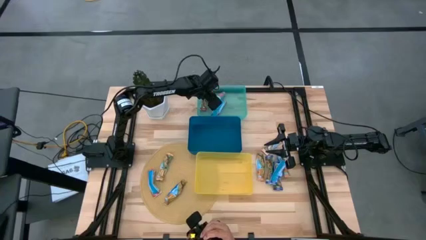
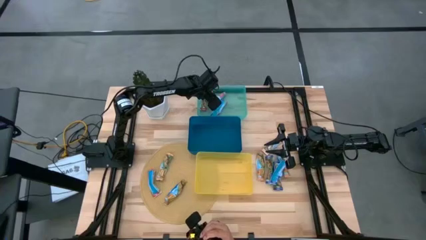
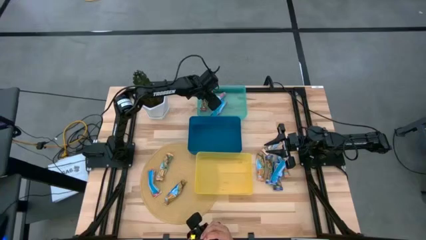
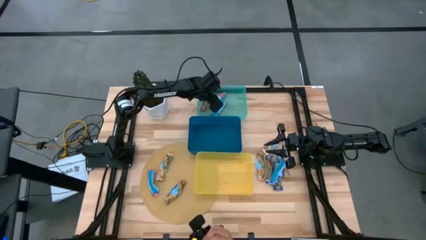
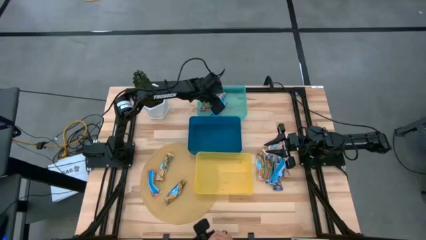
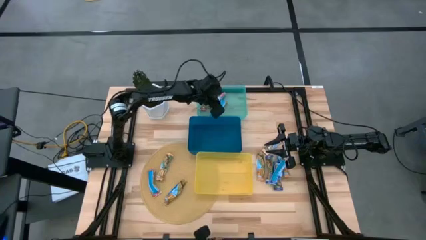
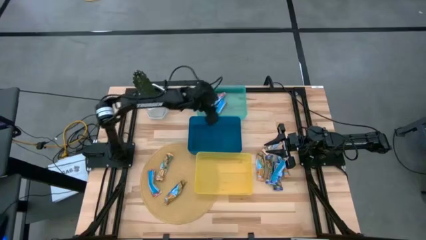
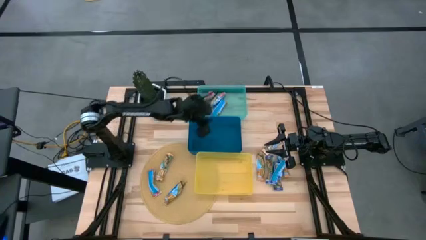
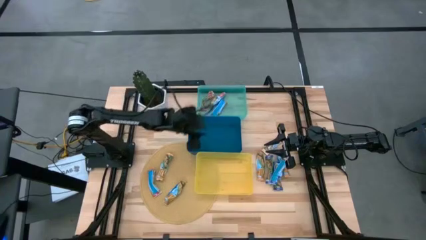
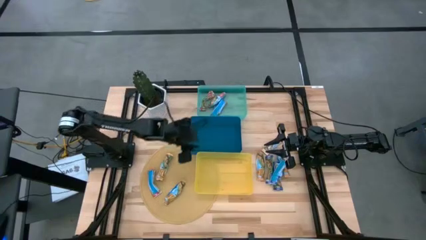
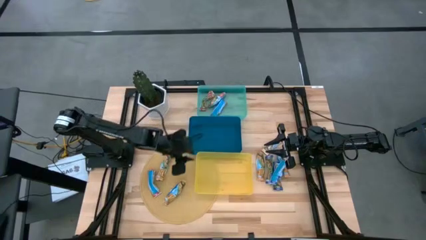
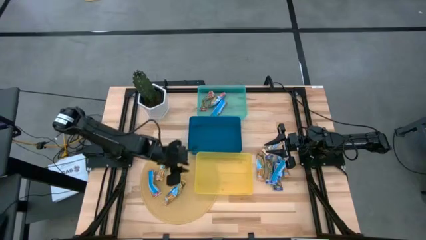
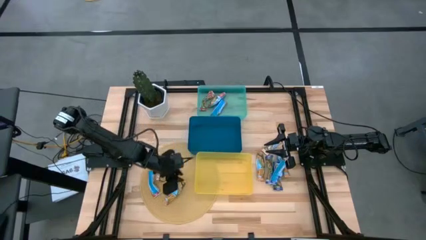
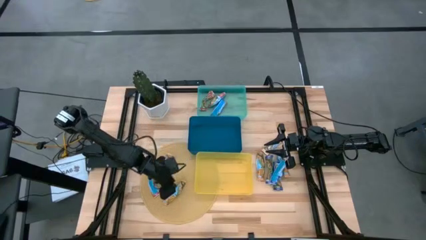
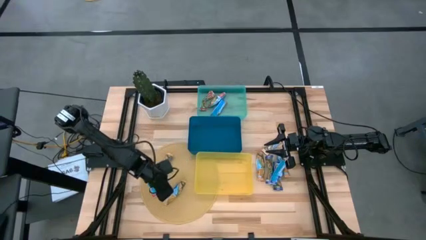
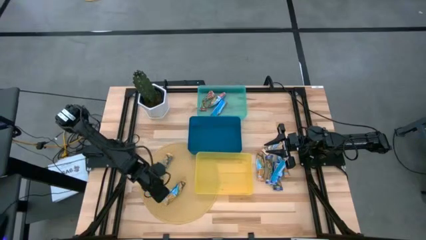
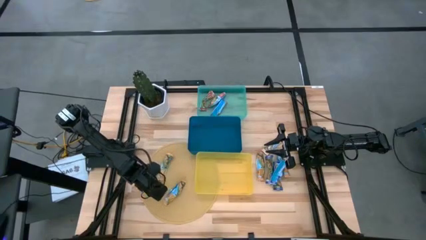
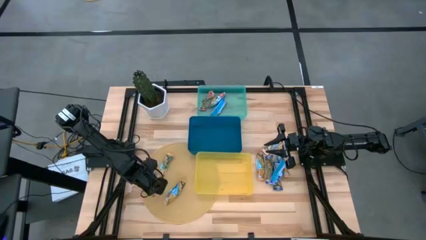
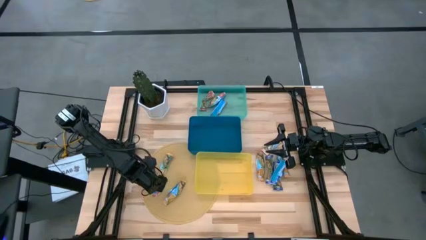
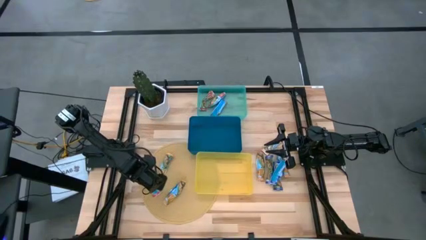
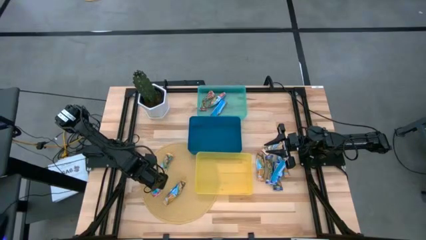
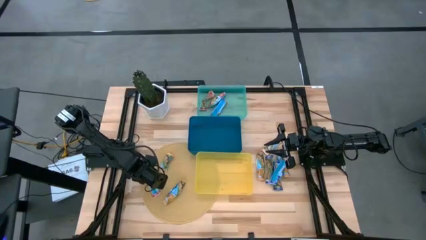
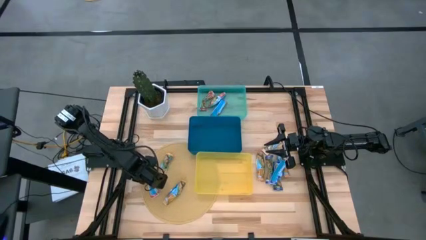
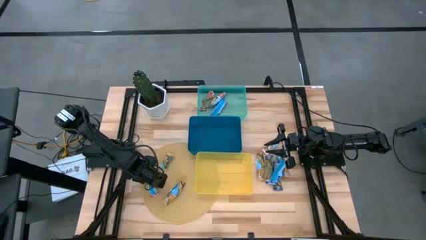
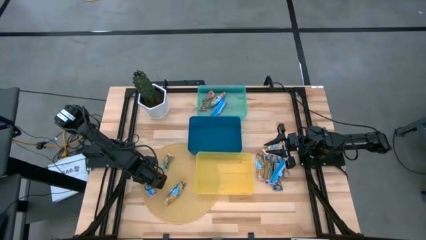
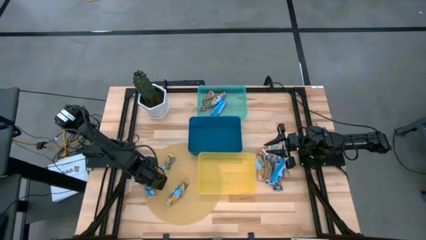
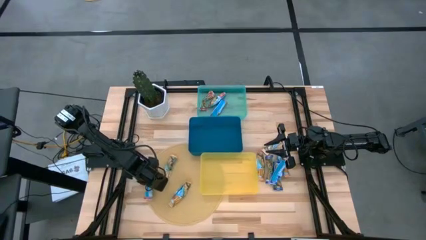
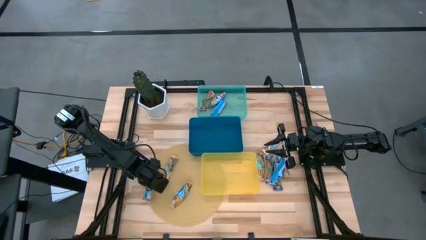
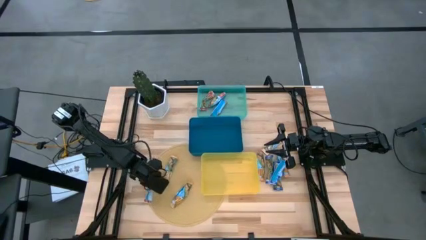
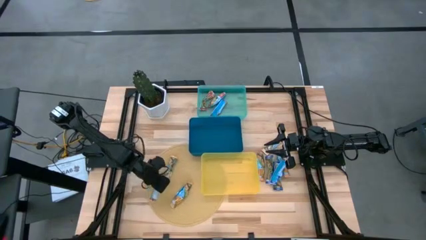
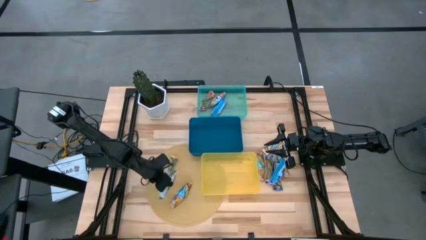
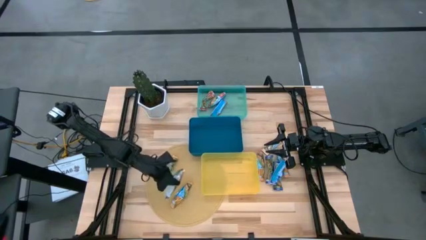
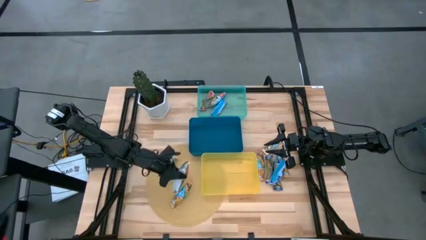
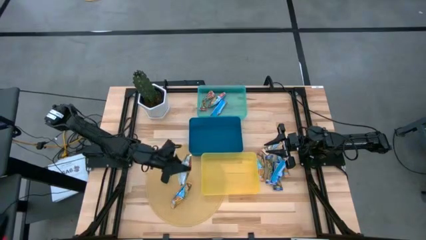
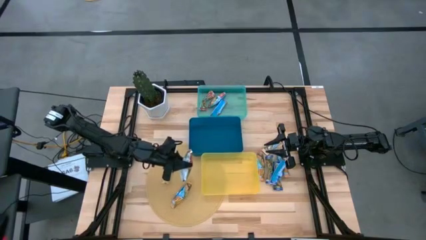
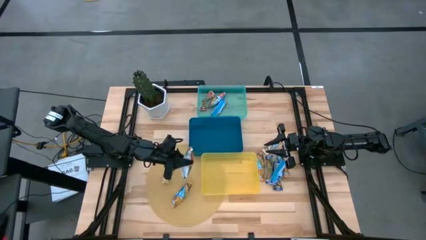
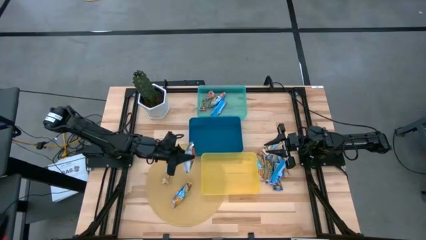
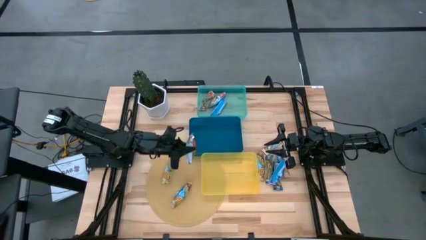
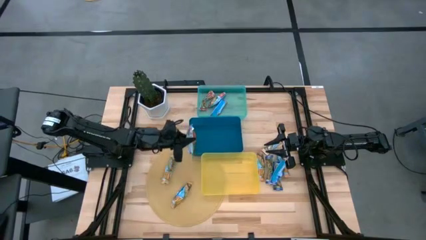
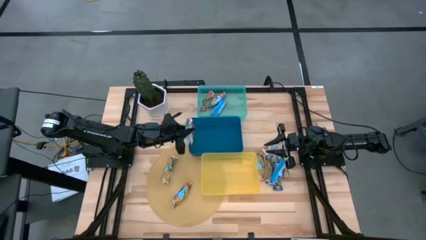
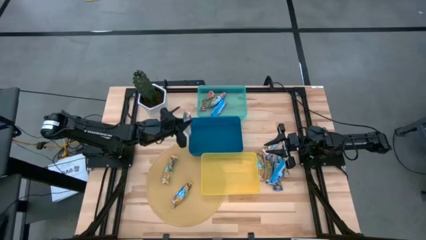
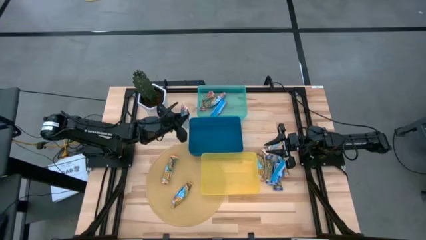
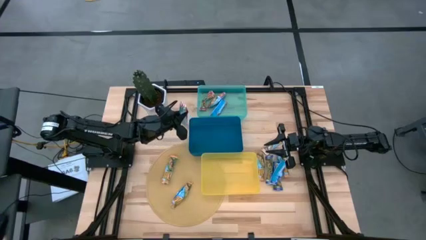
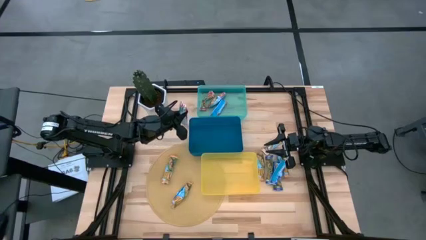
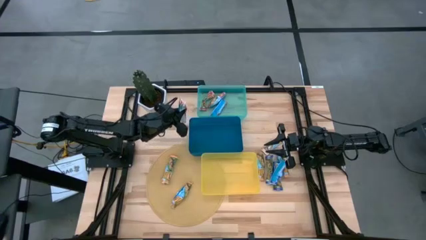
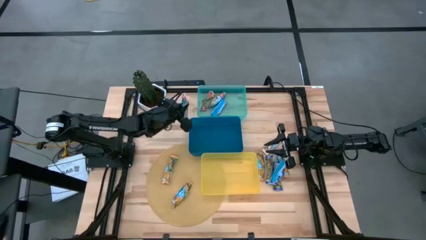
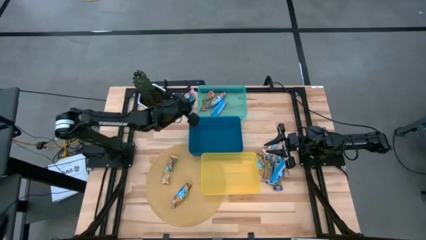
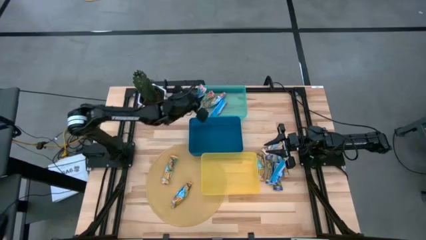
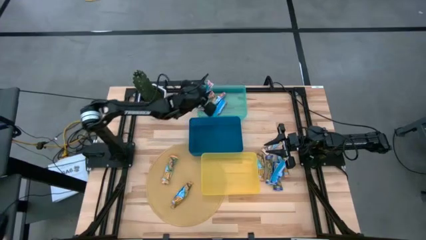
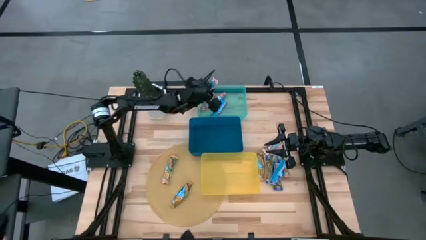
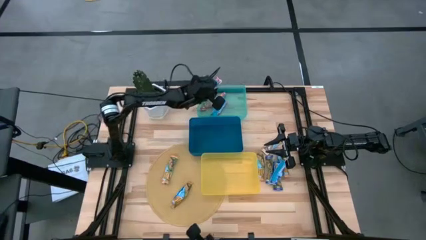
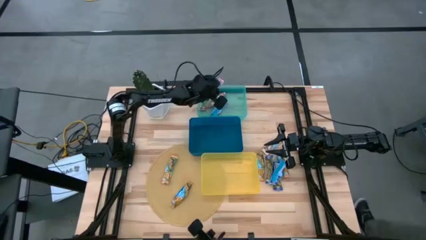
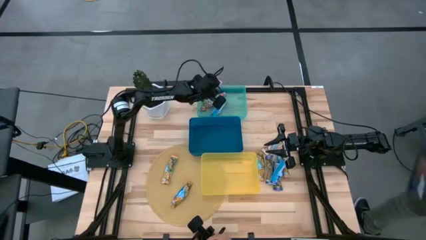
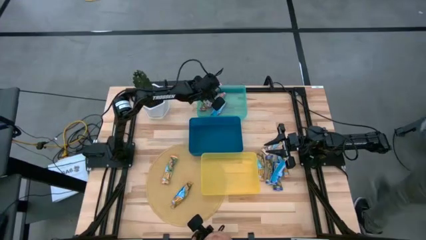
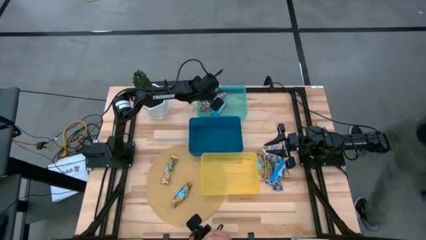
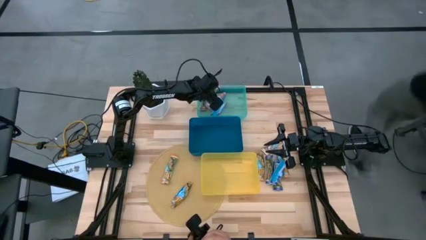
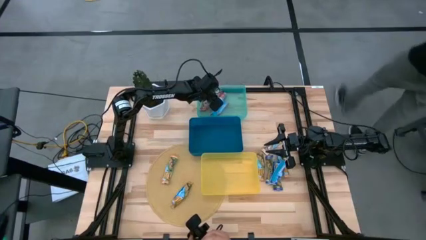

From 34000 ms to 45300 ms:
Task: Pick and place Granola Bars by type
Put the red granola bar into the green bin

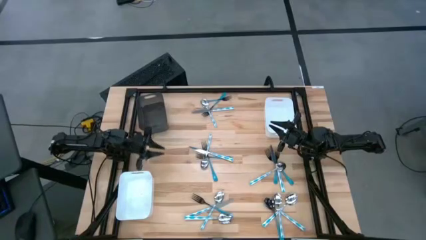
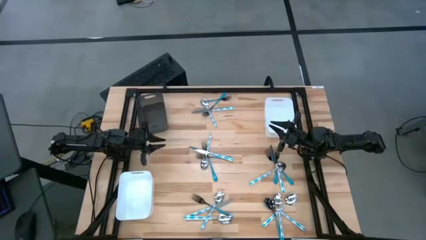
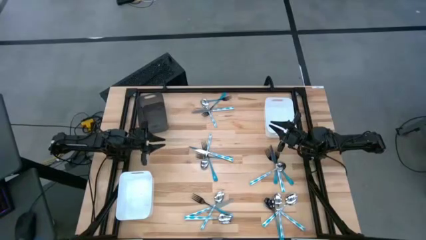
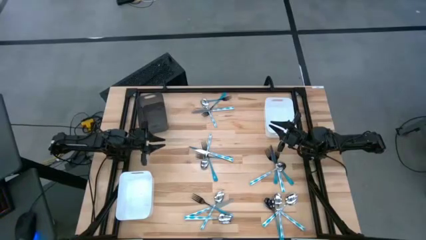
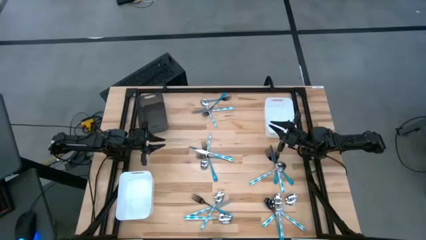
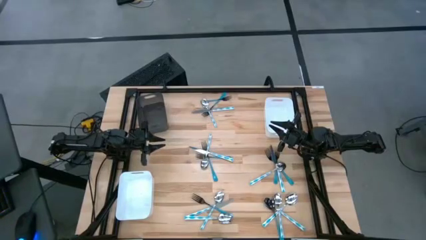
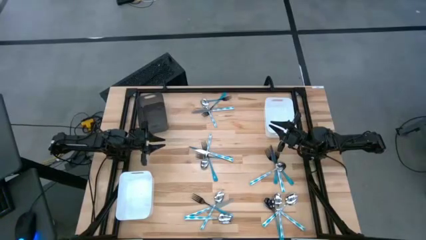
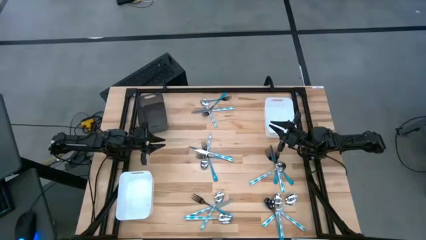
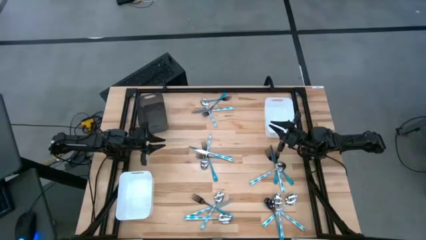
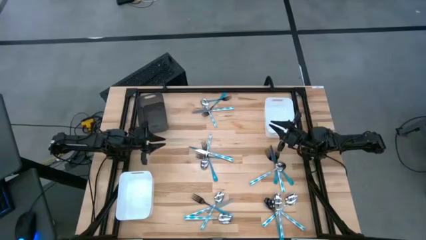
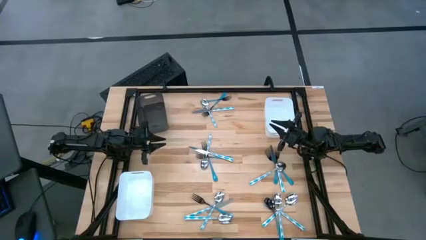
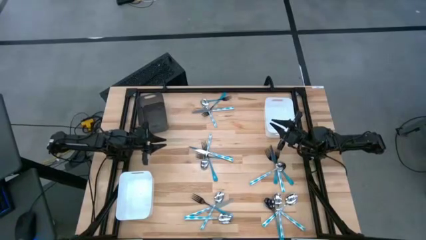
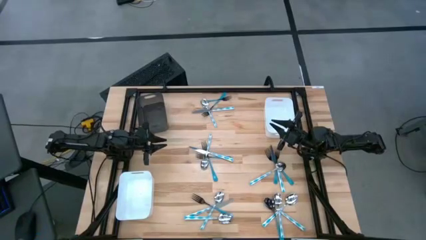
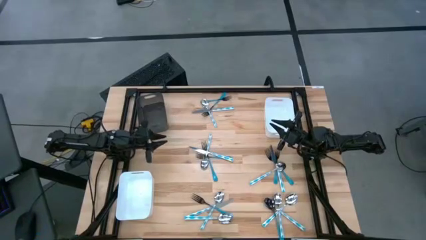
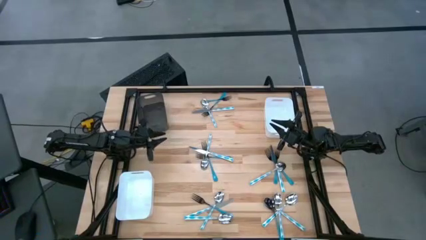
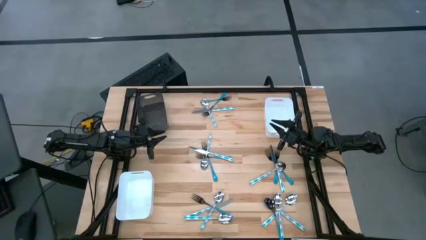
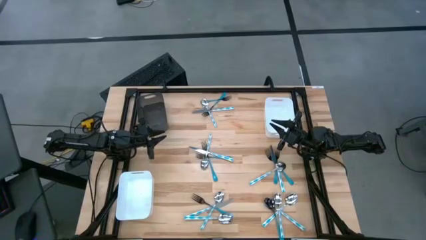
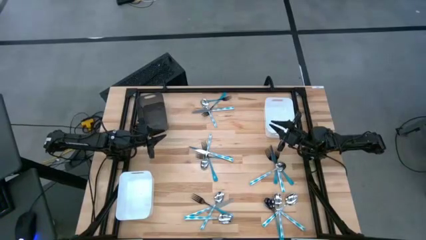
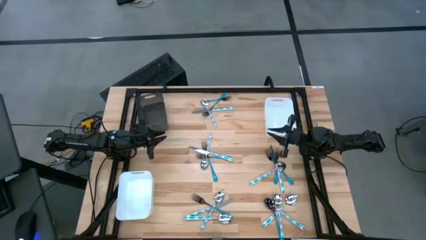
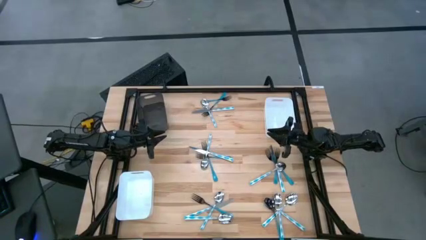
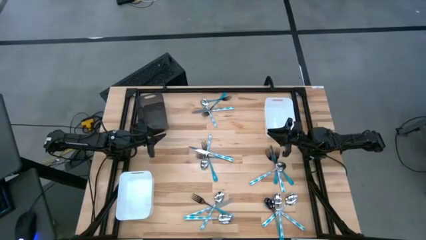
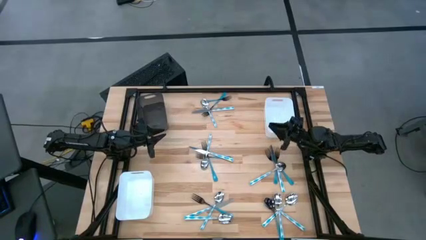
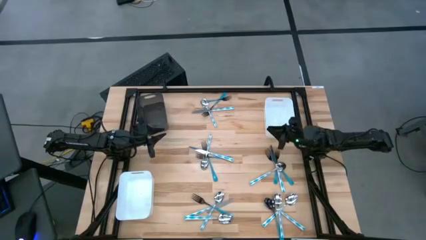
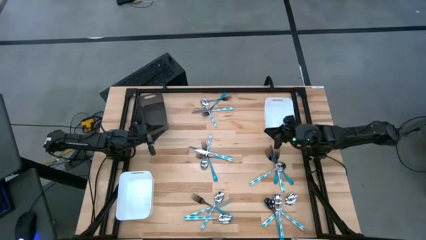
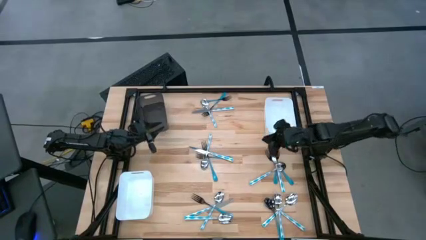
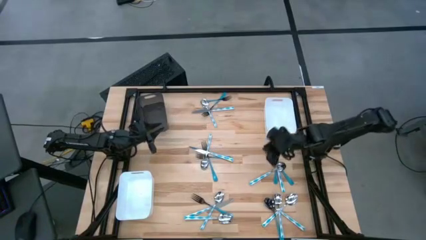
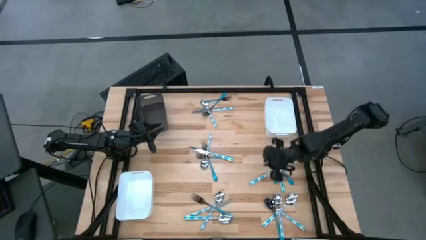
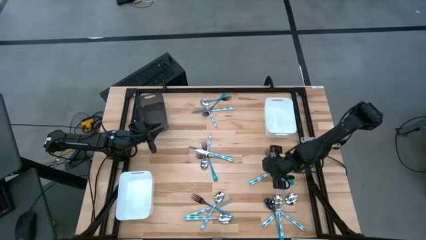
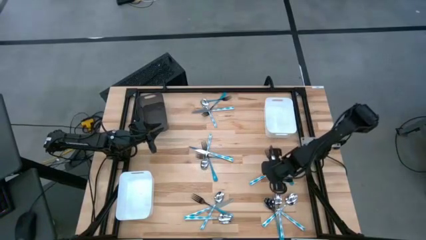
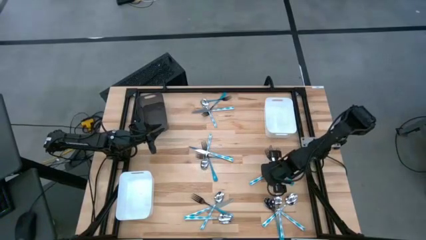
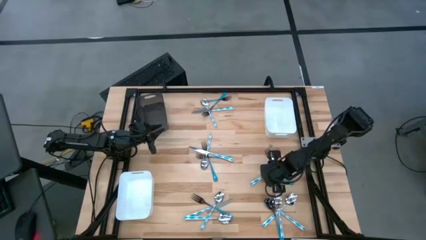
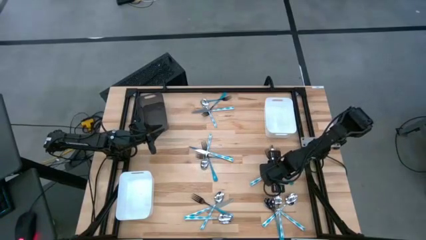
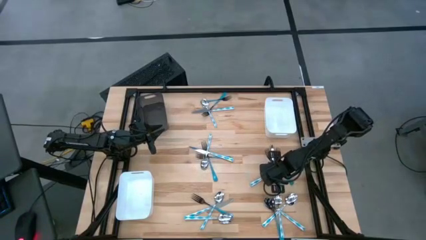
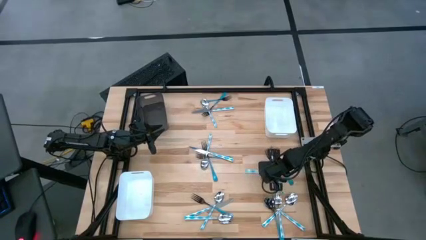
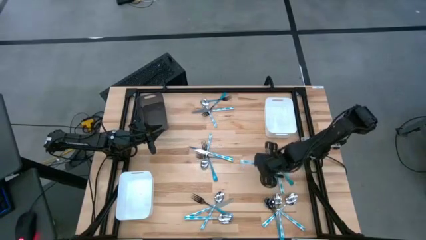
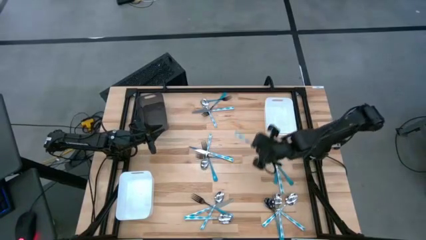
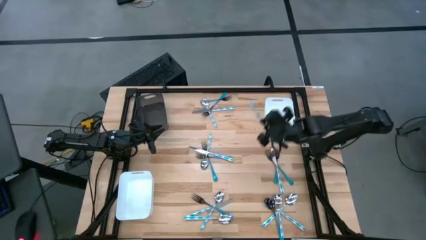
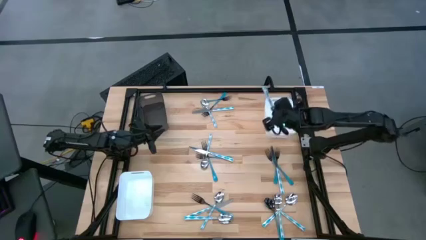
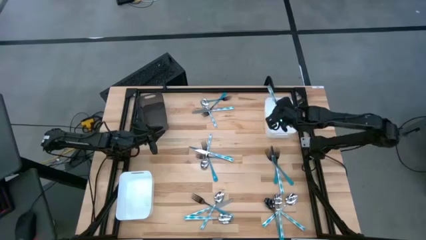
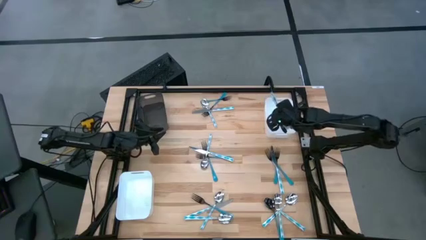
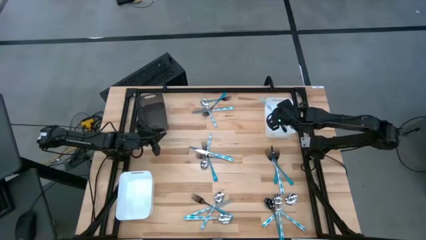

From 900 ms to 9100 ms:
Task: Sort silverware by color (type)
Put the blue white spoon into the right white bin
